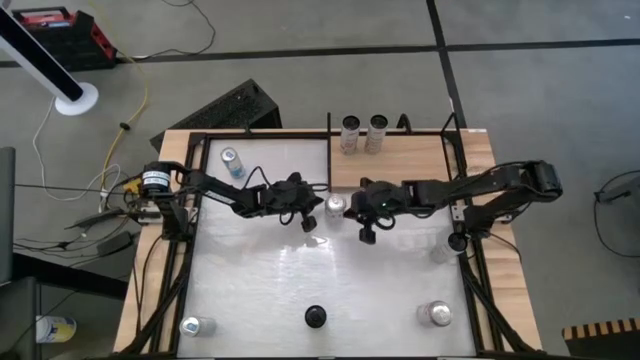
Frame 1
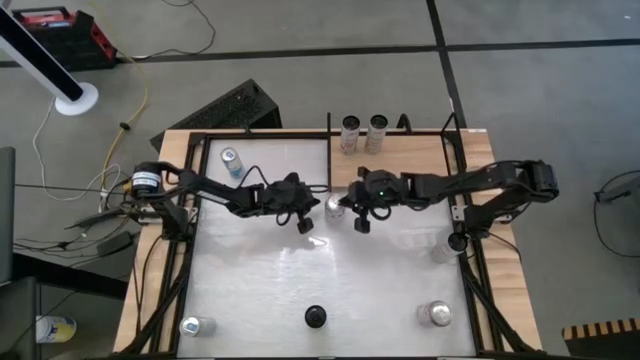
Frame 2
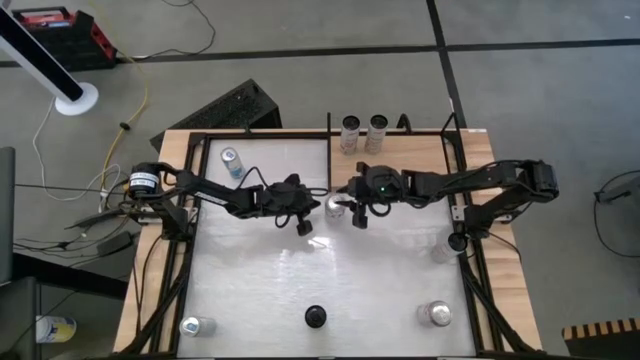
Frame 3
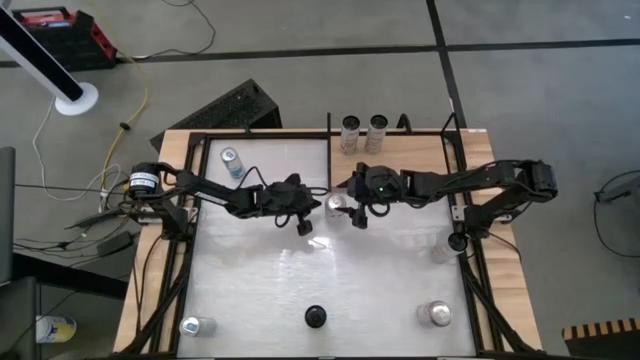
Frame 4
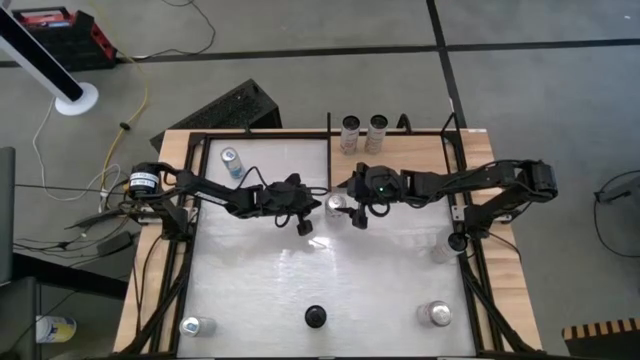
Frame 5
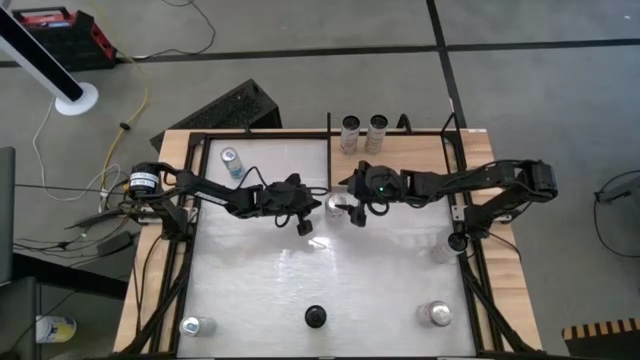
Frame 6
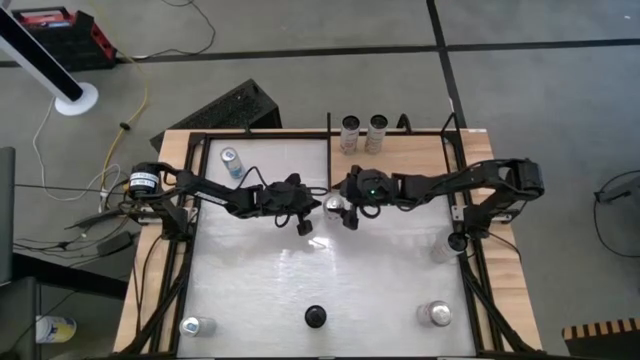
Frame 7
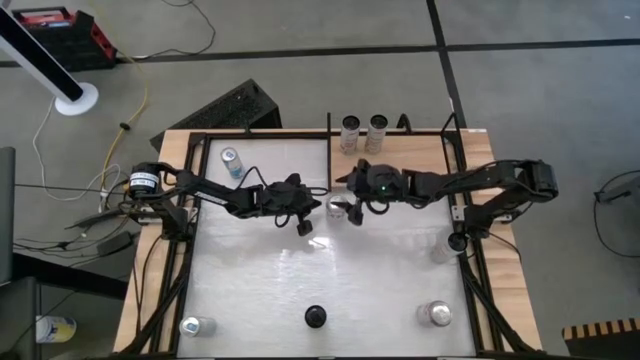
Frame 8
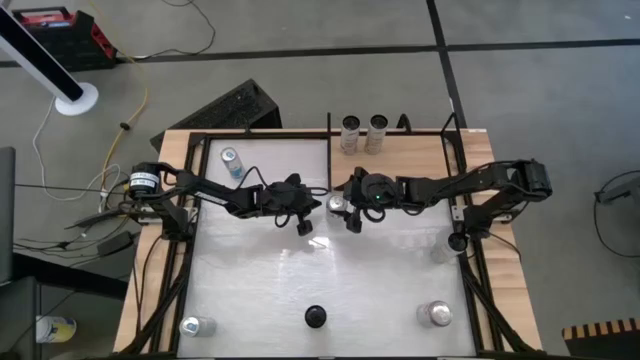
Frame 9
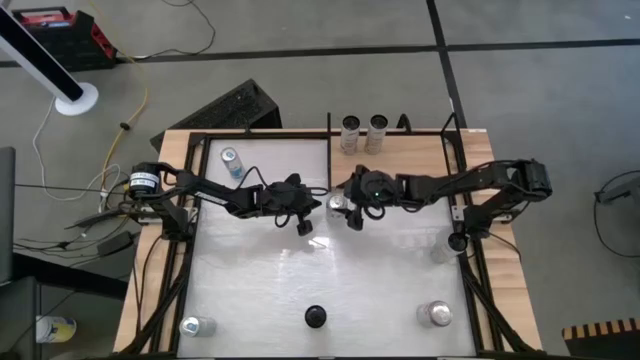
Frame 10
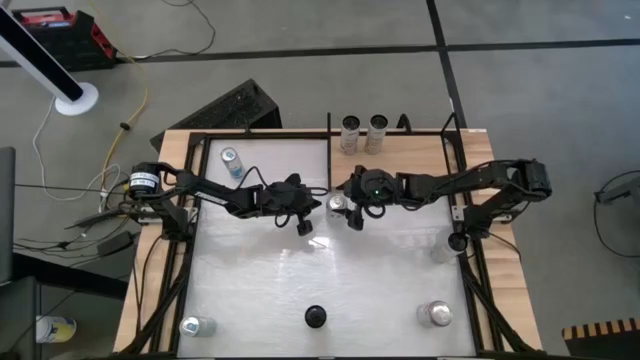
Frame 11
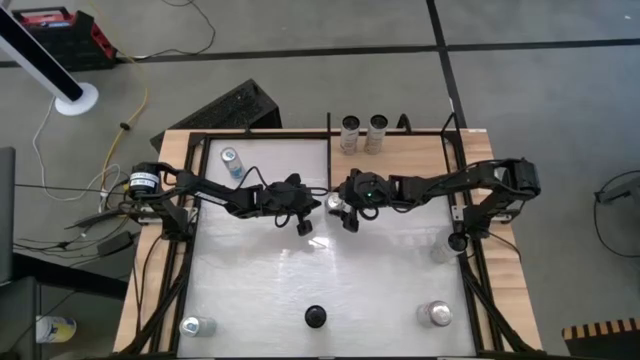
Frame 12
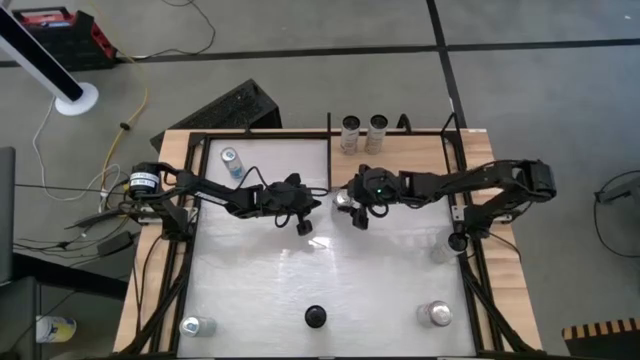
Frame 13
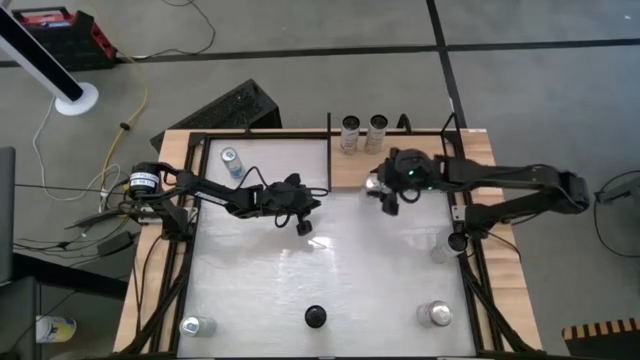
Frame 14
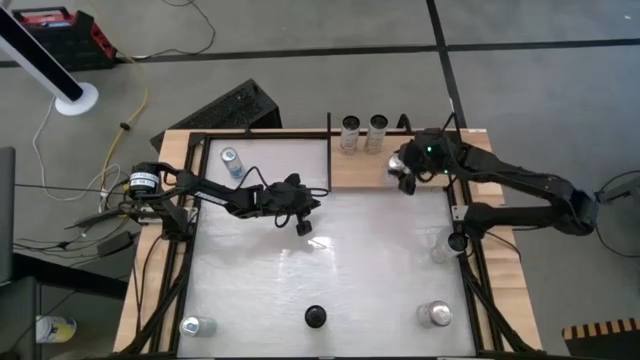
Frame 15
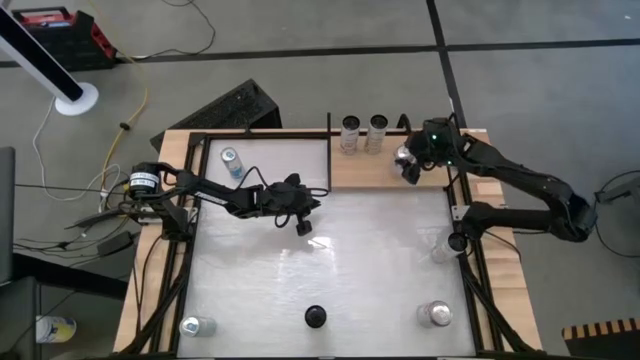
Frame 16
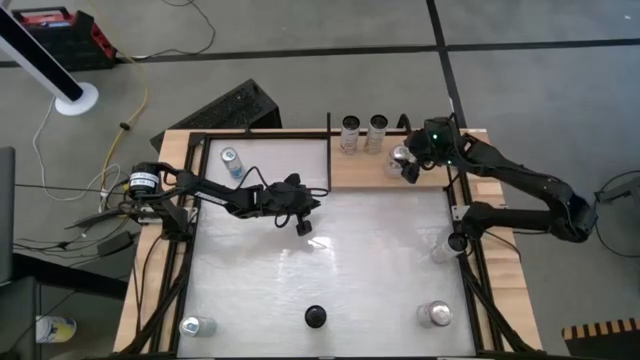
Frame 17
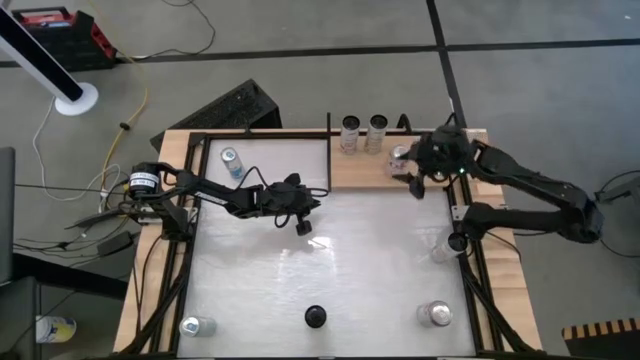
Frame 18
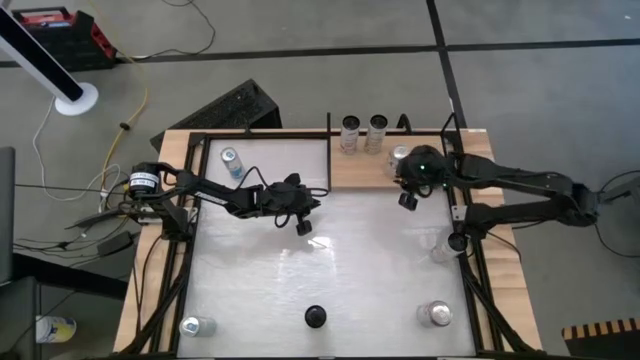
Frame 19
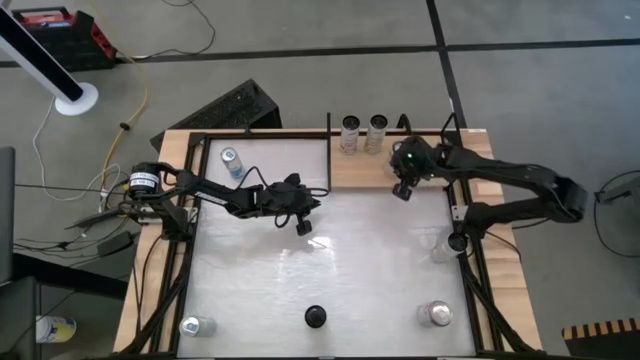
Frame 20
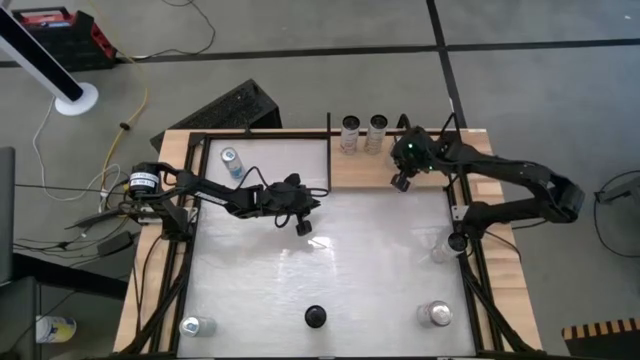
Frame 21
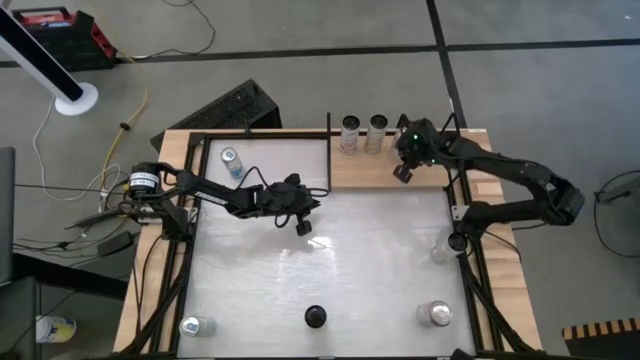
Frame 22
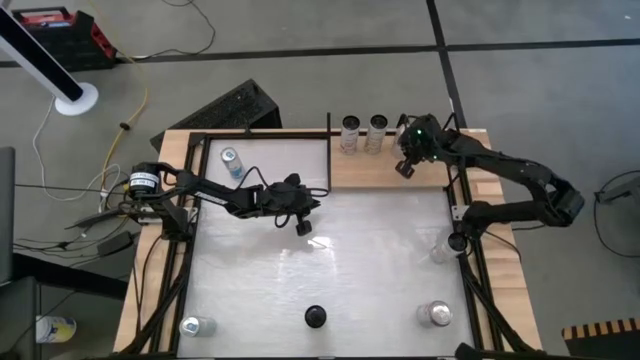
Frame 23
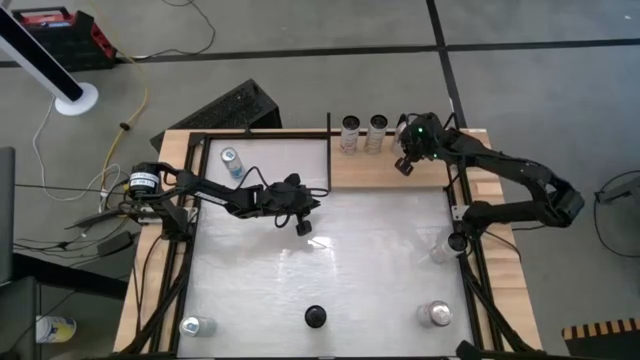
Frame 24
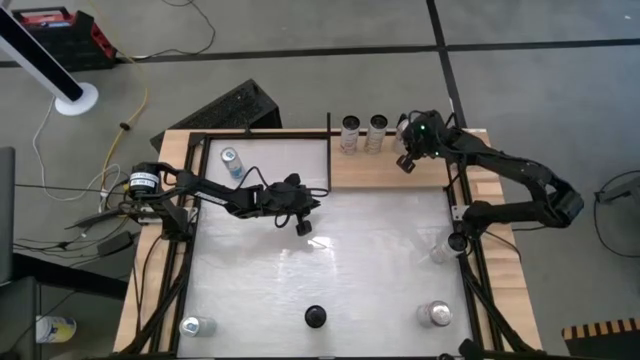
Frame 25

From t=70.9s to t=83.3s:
Task: Place canned beverage on shelf
Put the top silver soda can on the shelf

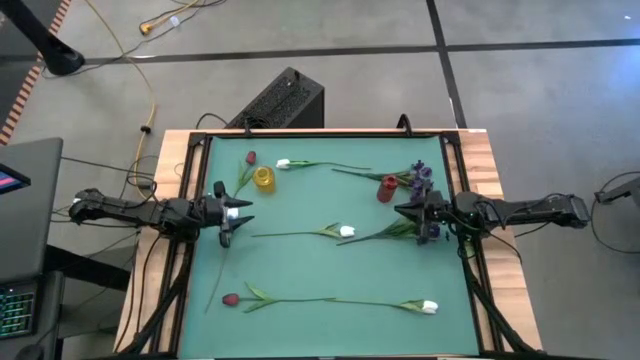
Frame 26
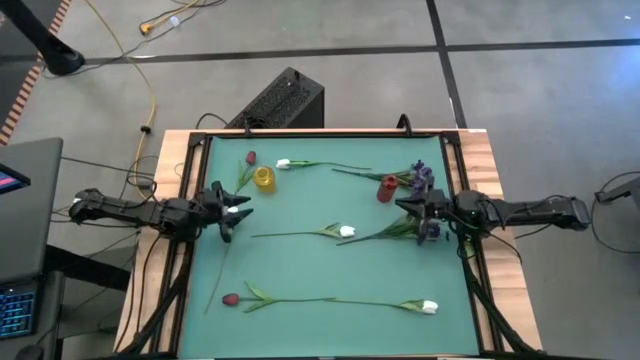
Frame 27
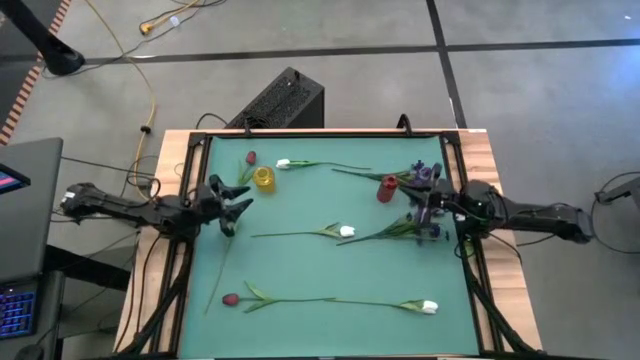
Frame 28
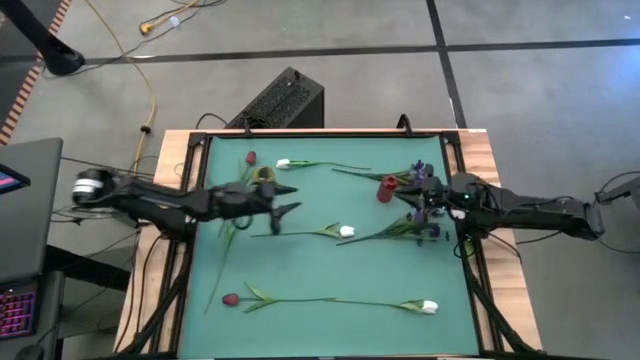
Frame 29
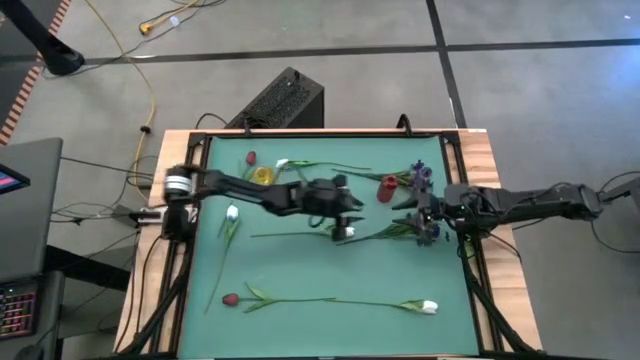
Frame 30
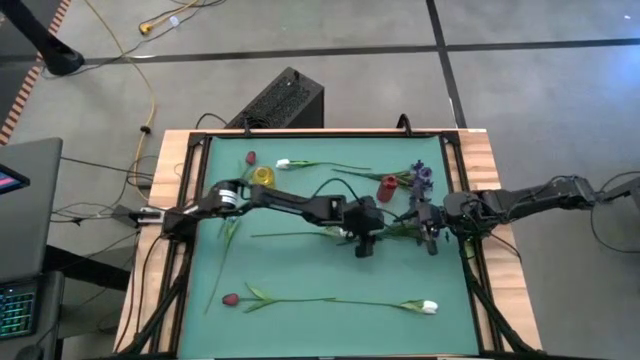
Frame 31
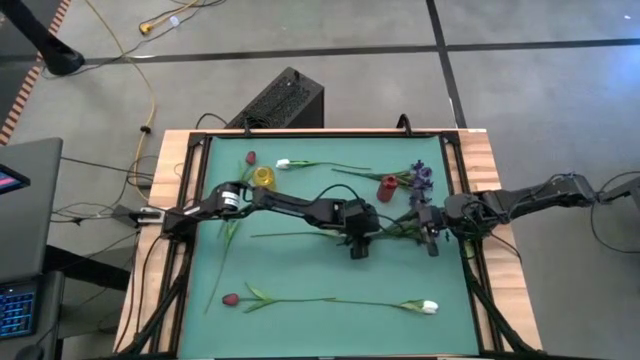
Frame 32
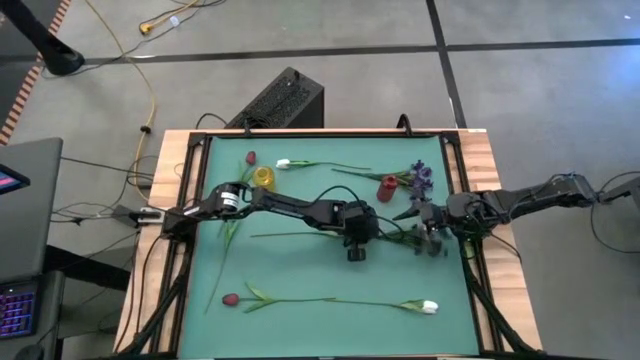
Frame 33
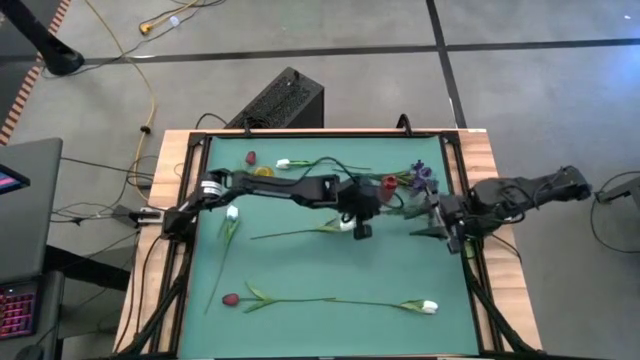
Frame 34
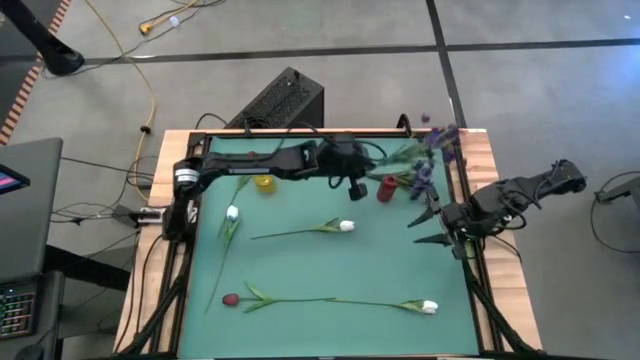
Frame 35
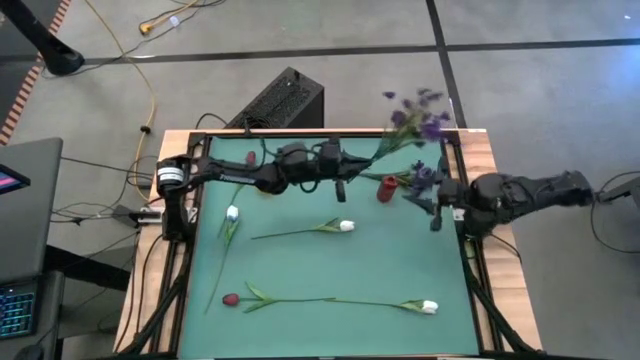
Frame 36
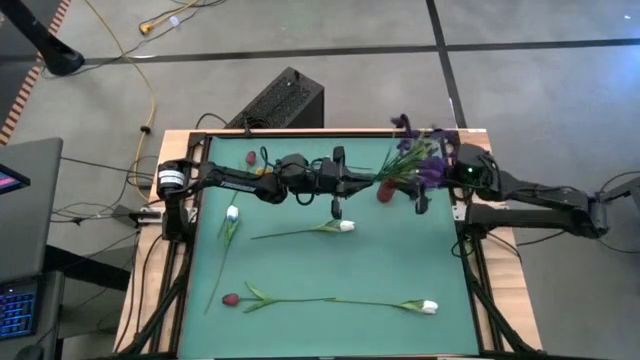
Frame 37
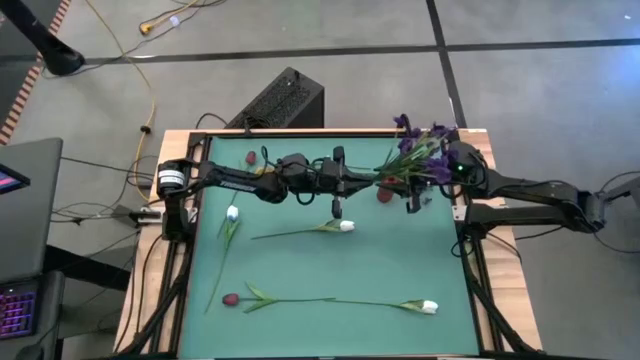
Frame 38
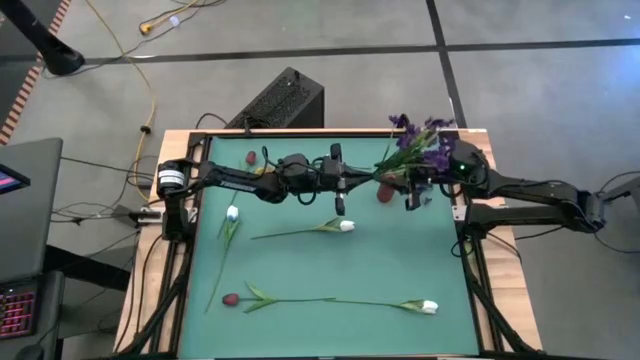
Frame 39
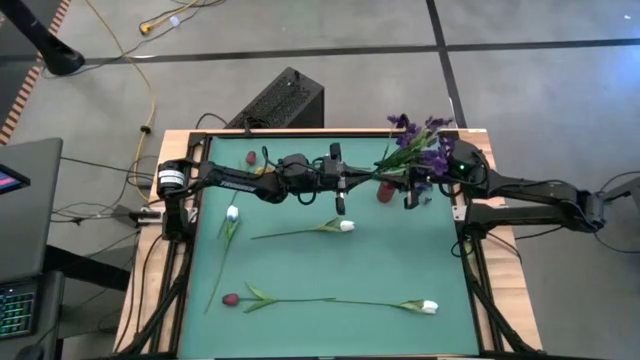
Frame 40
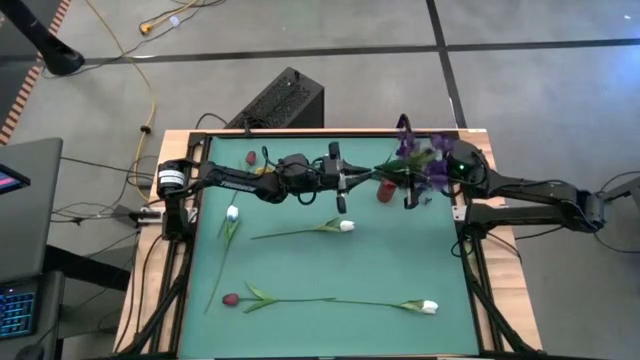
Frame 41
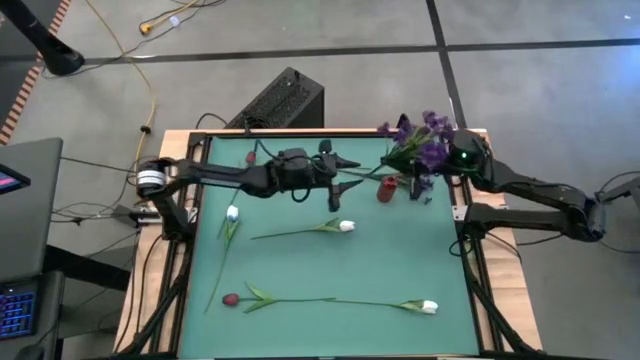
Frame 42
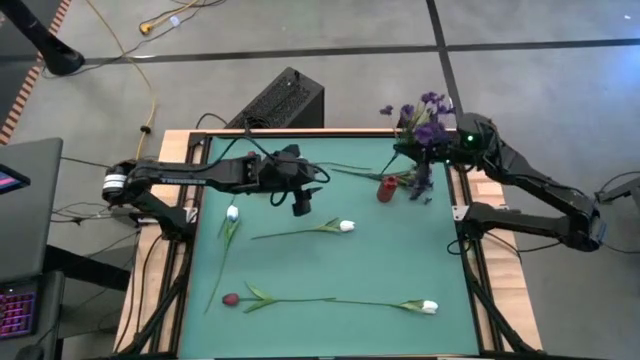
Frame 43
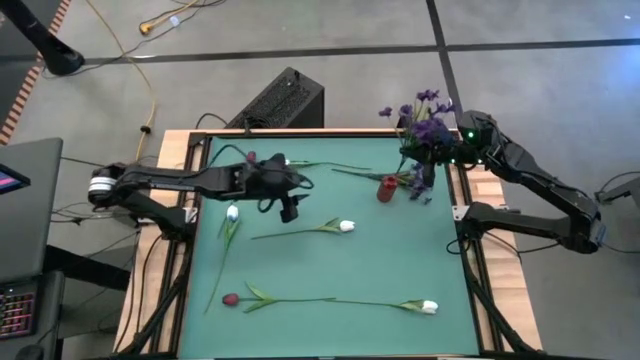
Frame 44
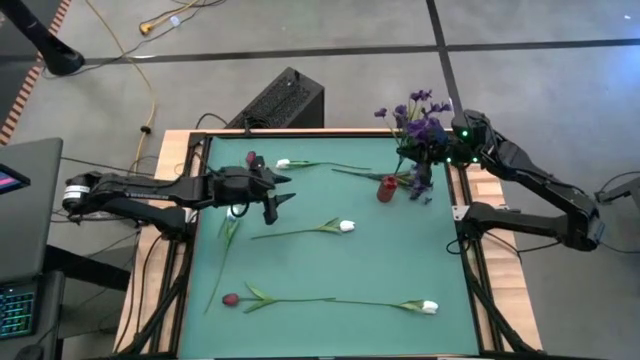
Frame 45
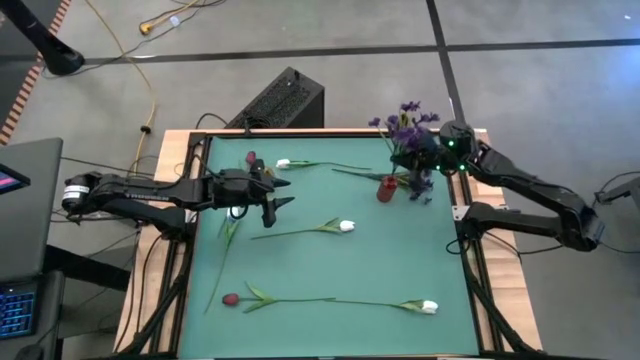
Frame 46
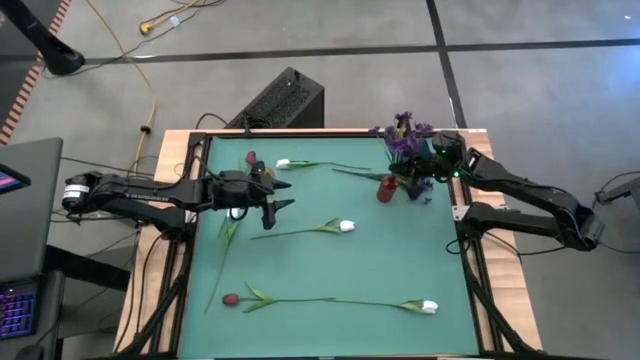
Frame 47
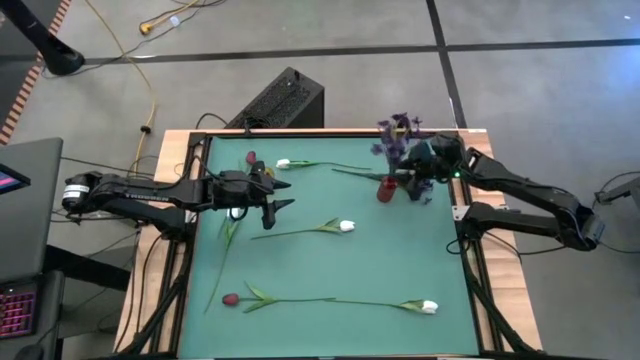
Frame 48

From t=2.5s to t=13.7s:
Task: Sort flowers into vase by color
Put the bottom violet flowers into the red vase
